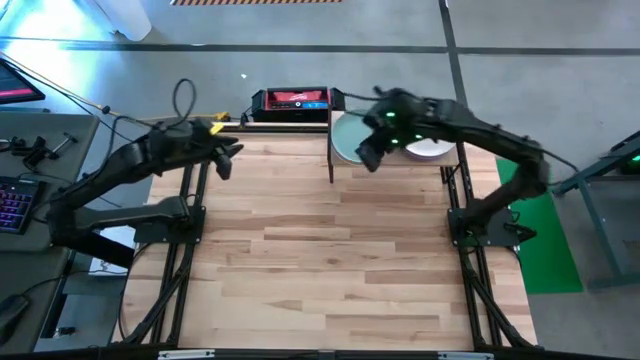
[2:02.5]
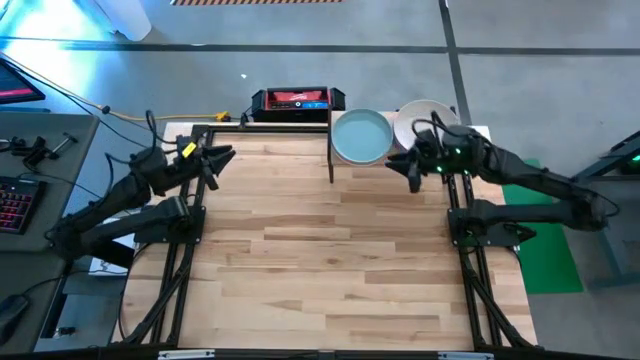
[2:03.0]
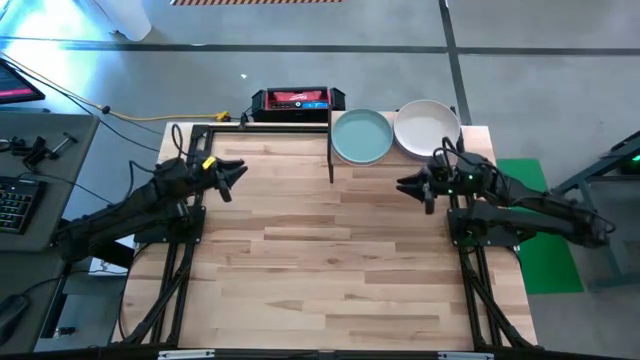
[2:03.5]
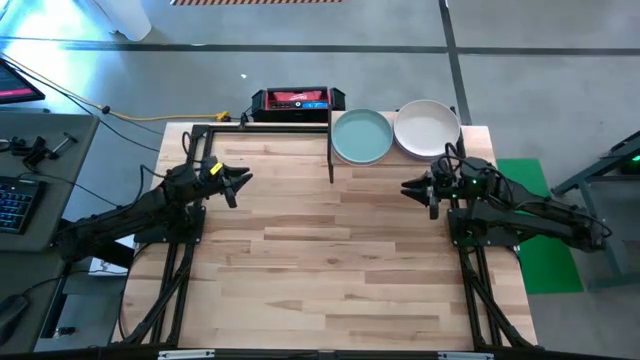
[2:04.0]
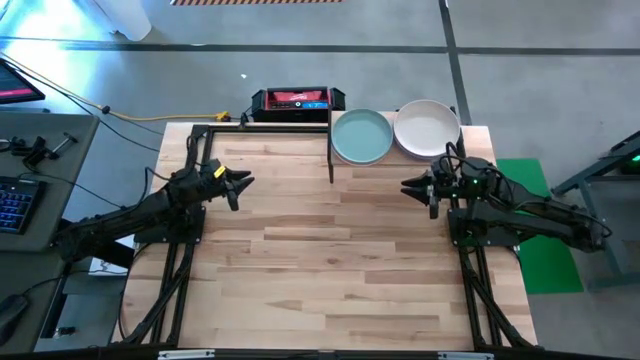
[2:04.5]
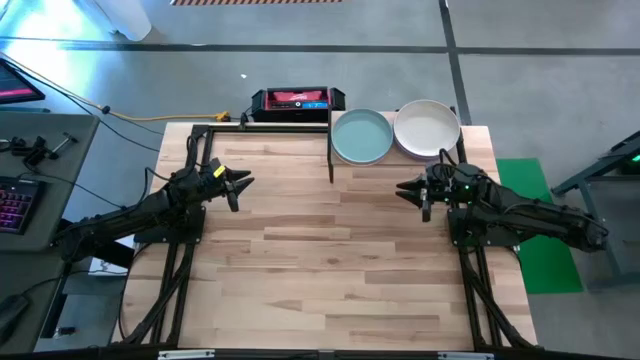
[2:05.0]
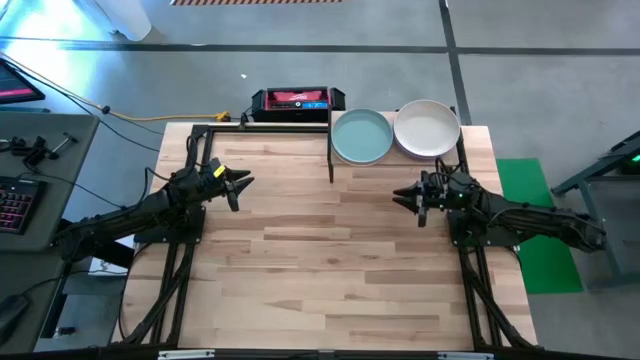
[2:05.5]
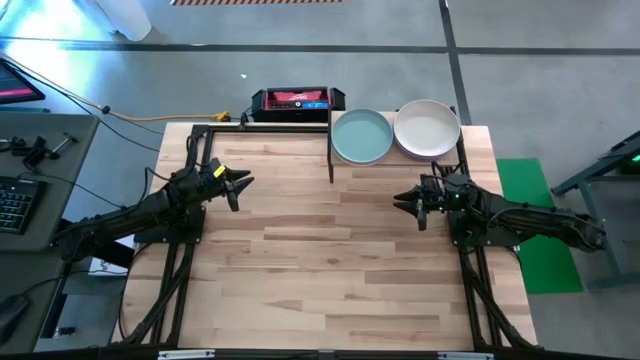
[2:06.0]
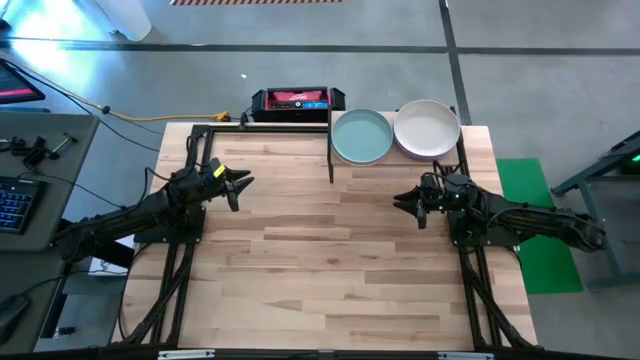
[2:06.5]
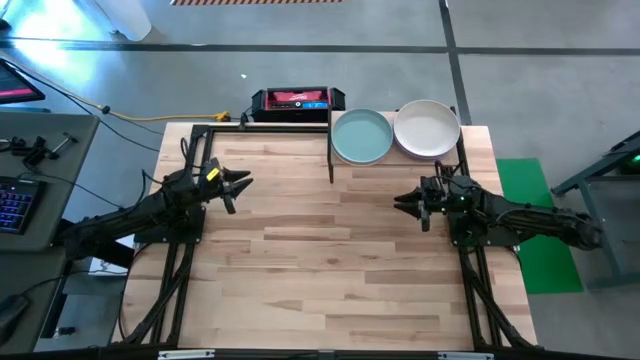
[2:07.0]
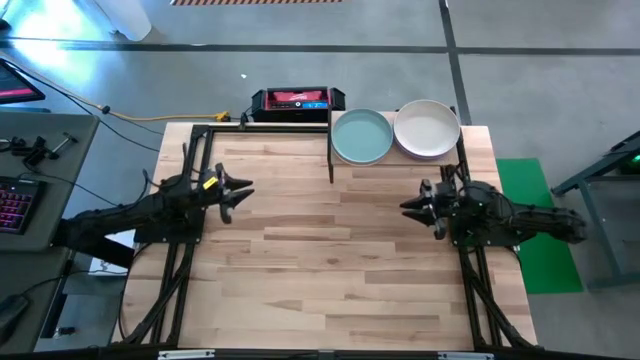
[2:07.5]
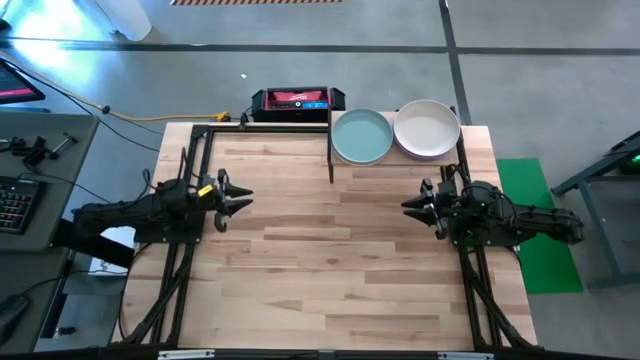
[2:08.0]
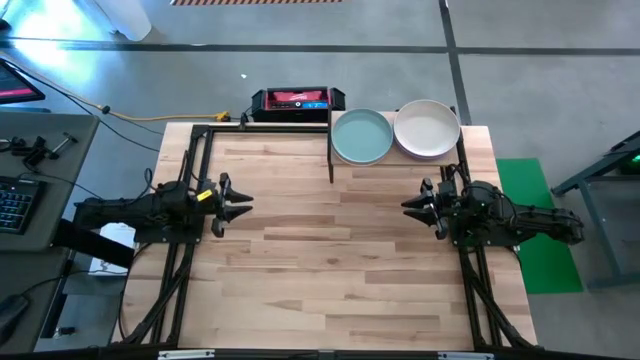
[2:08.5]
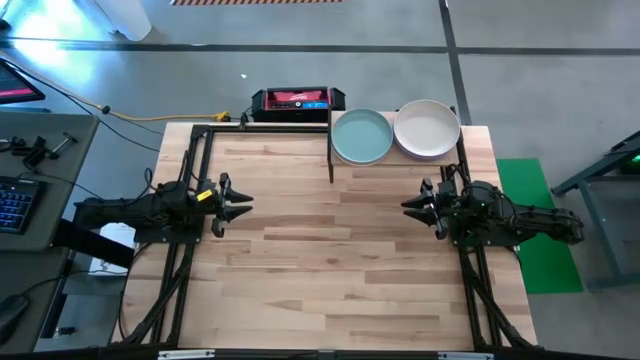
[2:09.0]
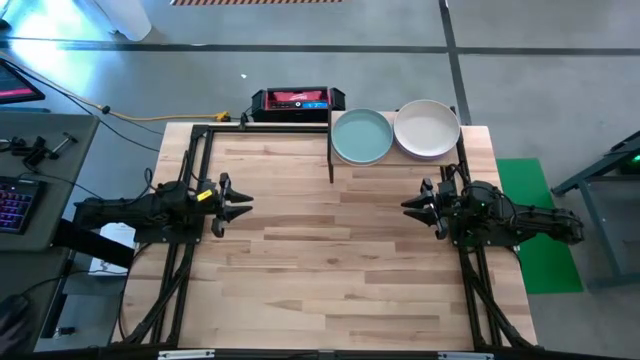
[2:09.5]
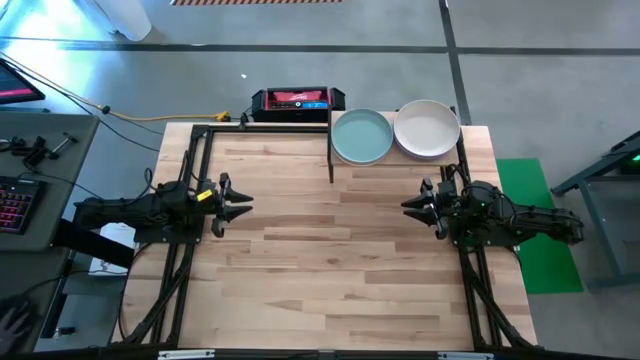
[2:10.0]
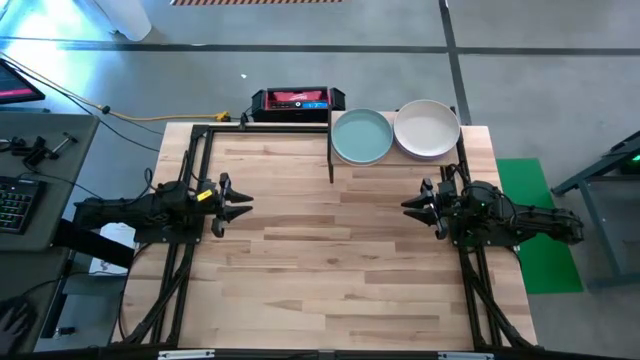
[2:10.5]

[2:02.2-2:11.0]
Task: Place and stack plates onto a shelf
Return to Home Position

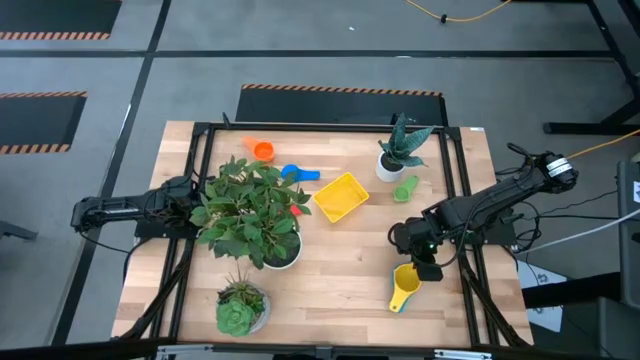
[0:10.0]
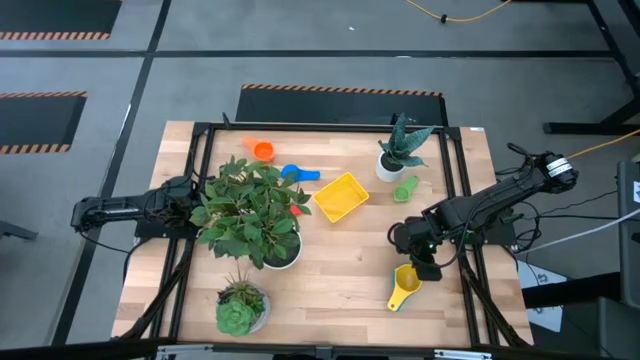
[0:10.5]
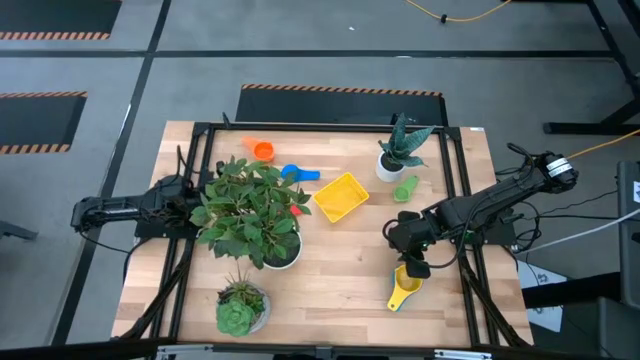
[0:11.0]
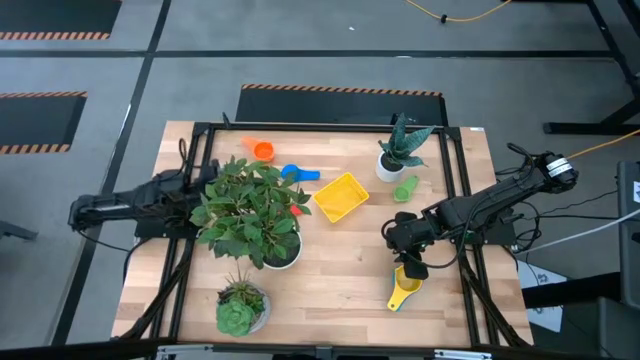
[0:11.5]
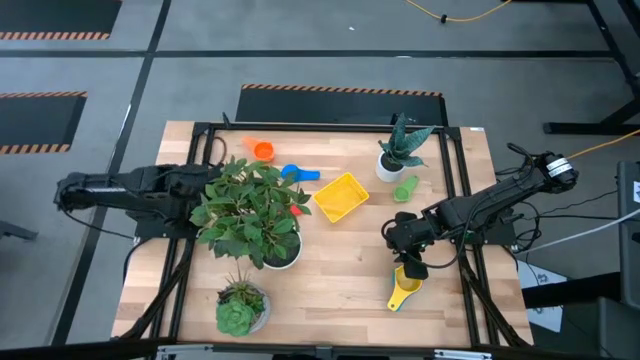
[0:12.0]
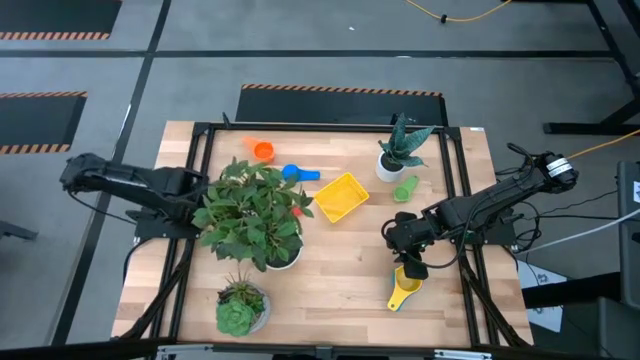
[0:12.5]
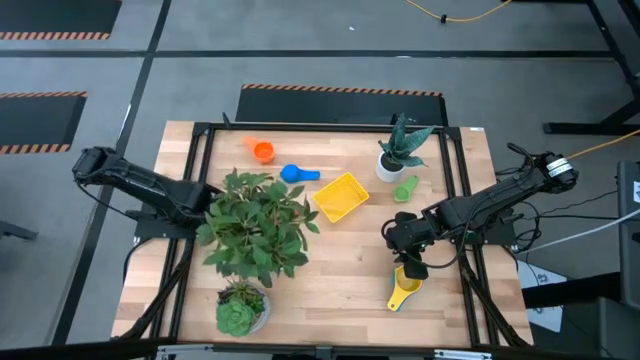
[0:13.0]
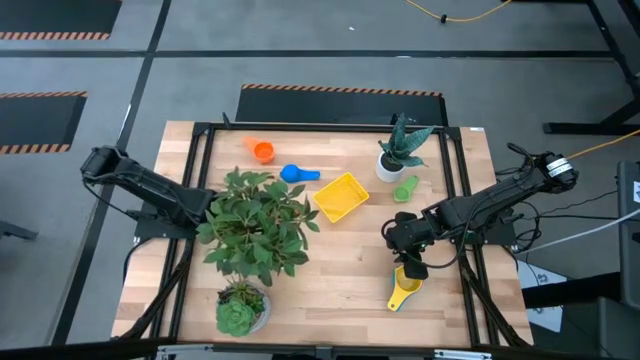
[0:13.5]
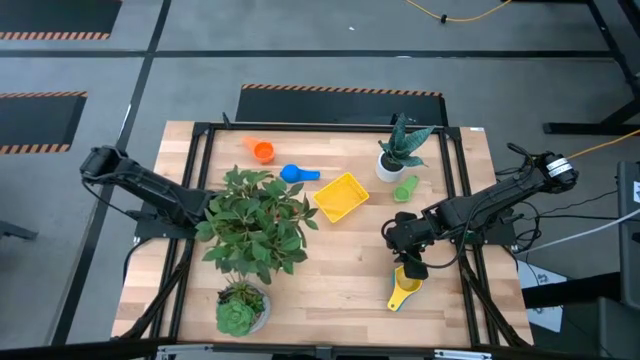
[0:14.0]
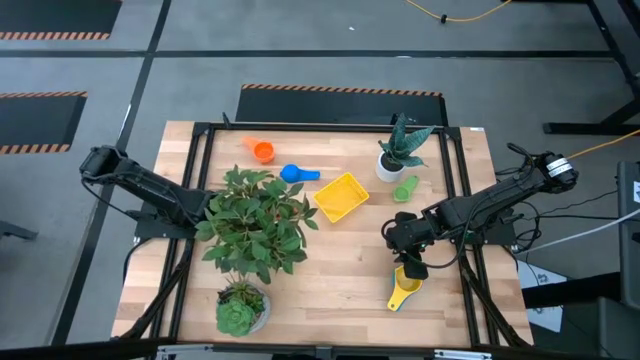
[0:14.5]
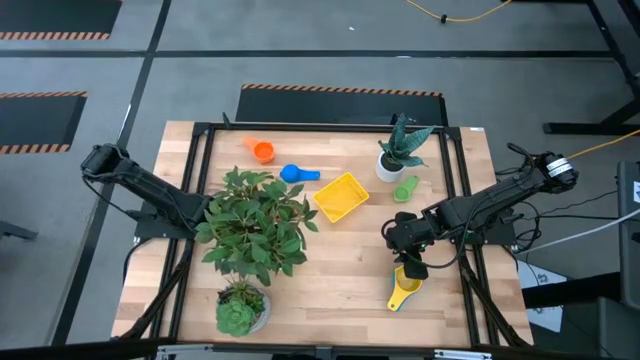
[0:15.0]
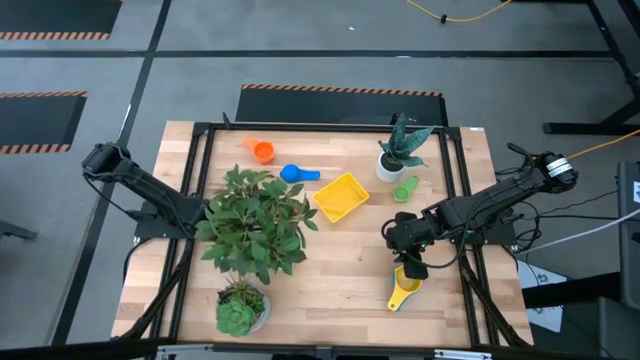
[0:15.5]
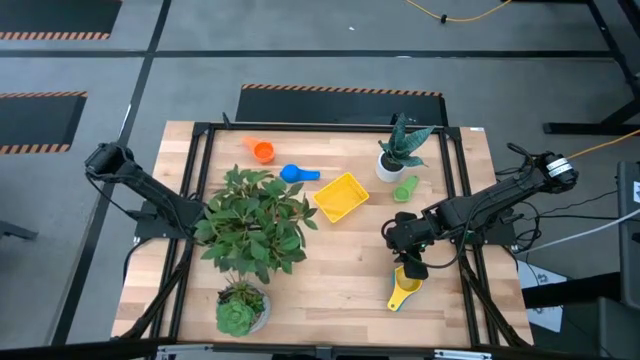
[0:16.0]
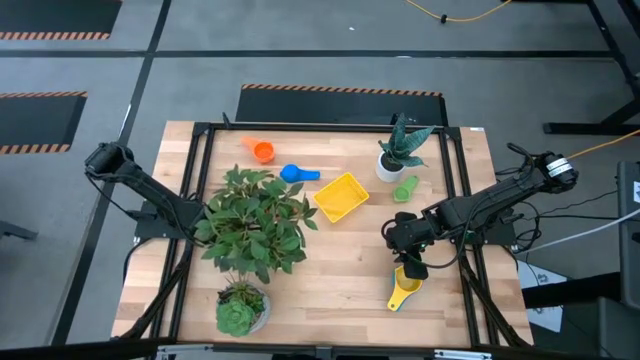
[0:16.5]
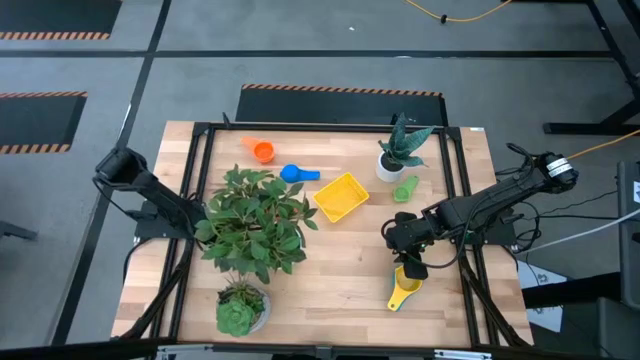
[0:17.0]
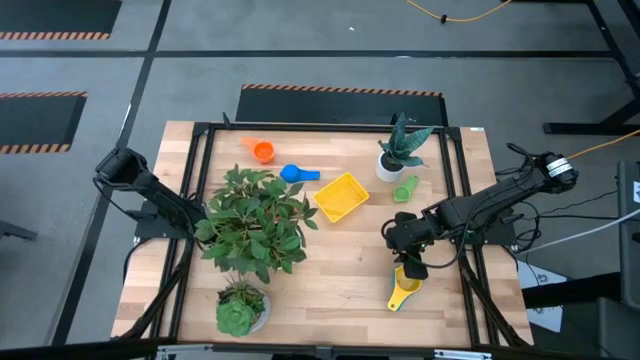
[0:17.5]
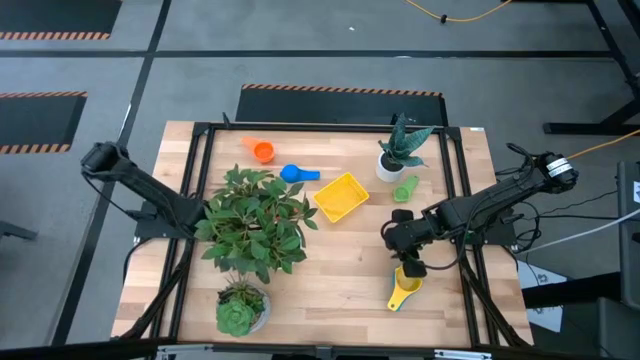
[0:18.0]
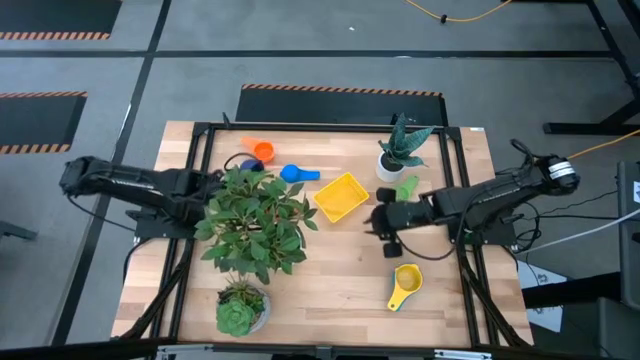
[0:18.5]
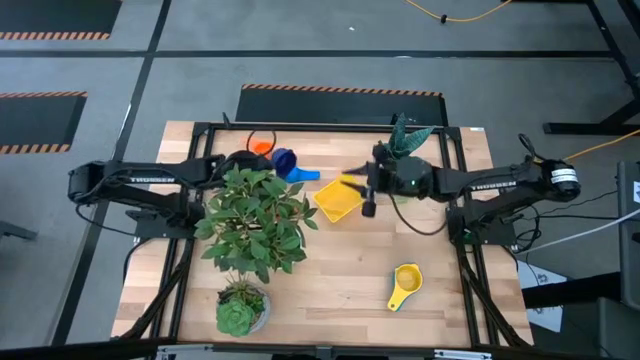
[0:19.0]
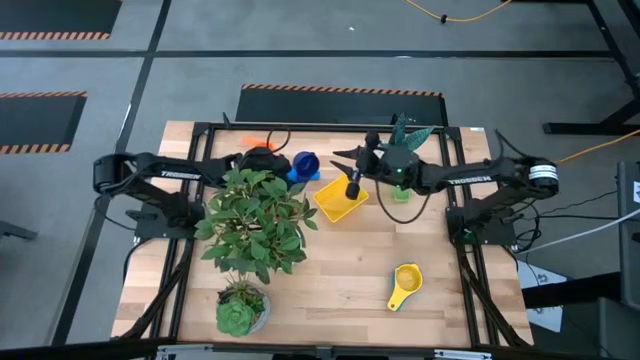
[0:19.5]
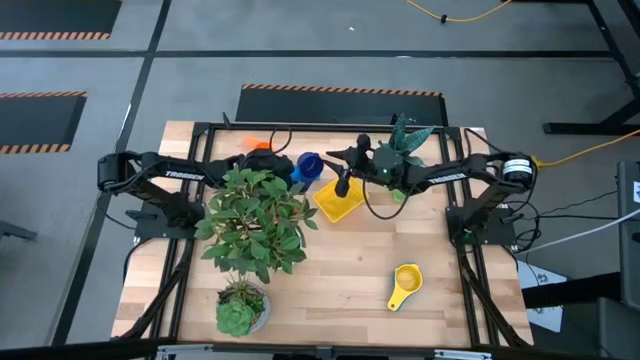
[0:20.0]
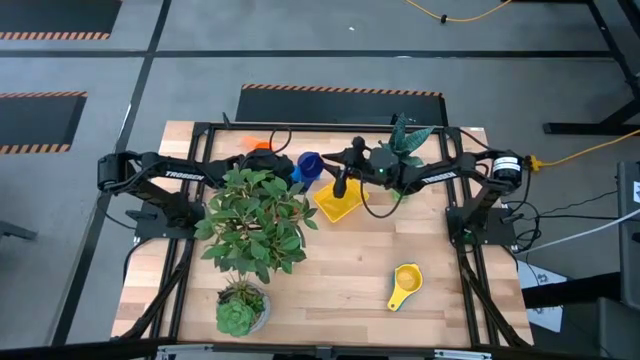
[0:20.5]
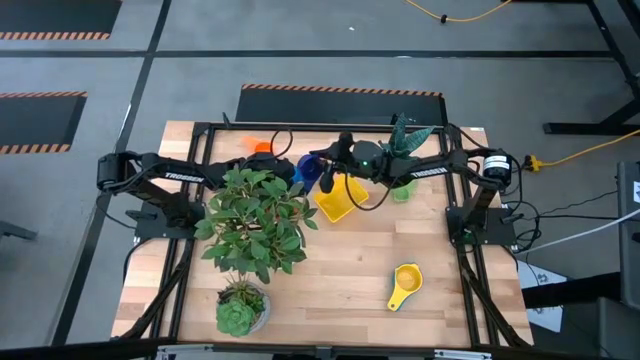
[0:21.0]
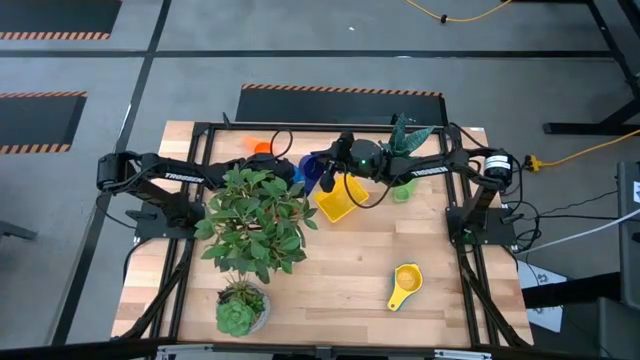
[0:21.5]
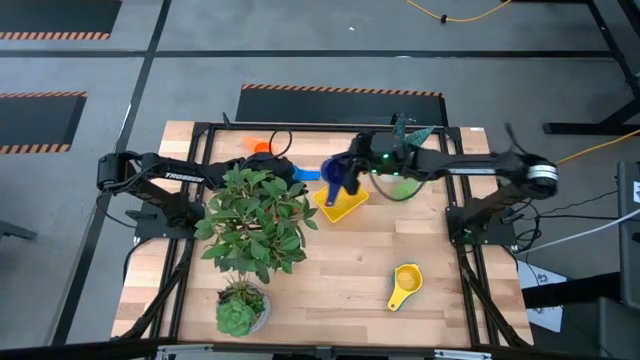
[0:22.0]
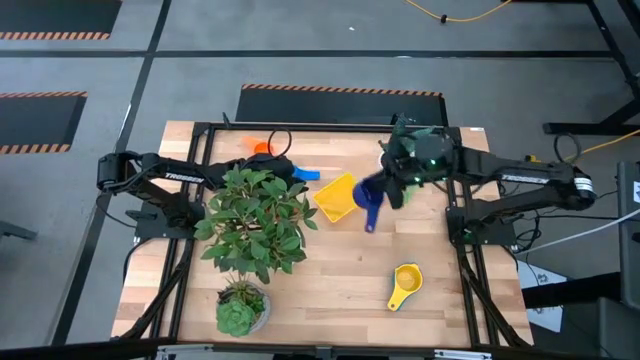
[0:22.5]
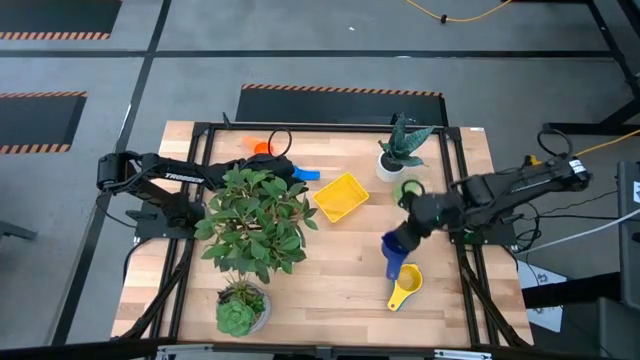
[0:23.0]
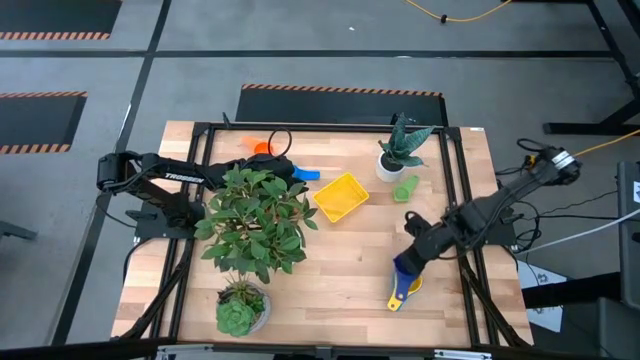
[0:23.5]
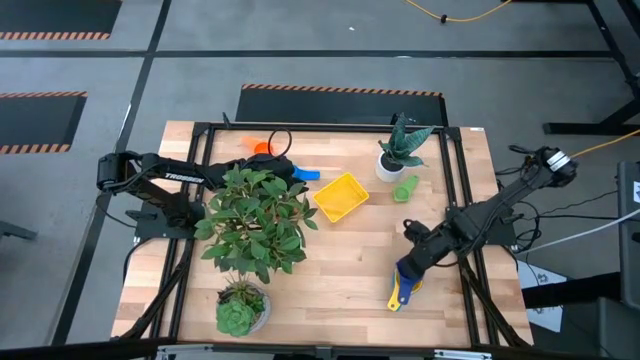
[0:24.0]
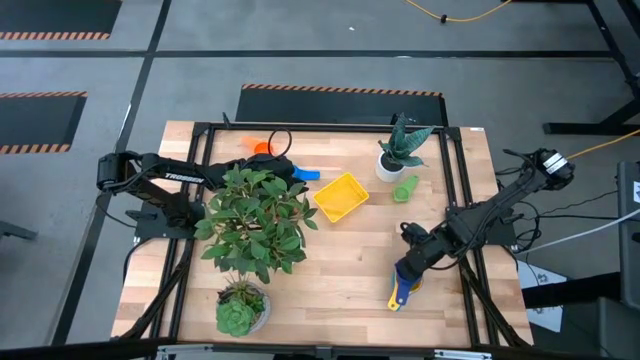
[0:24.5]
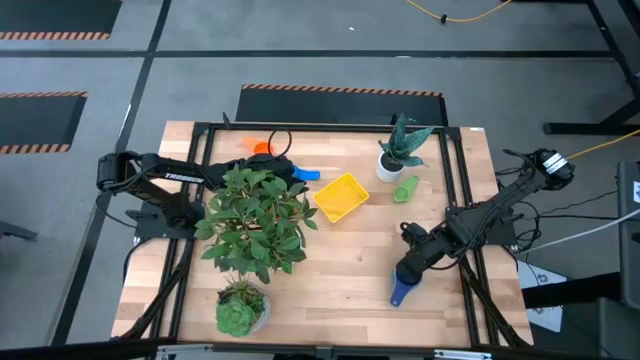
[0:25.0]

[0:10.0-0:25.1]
Task: Nest measuring cups in basket
Stack the dark blue measuring cup on top of the yellow measuring cup
